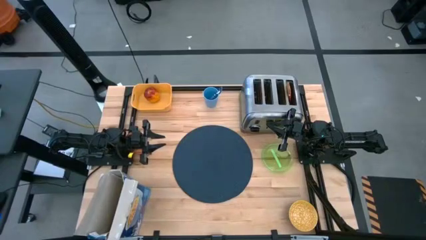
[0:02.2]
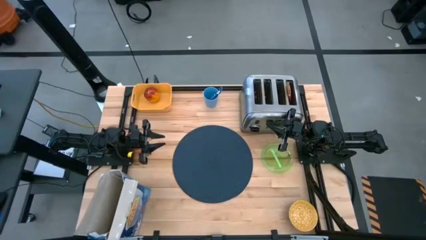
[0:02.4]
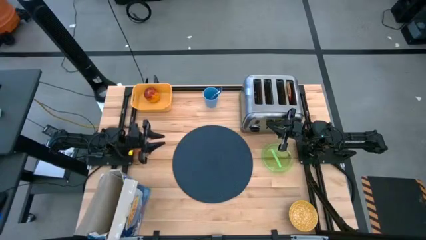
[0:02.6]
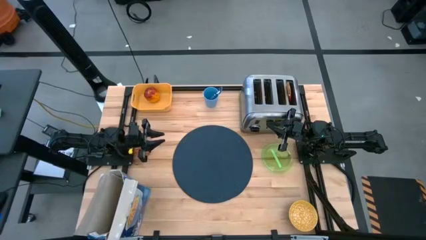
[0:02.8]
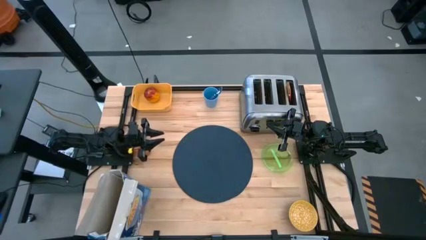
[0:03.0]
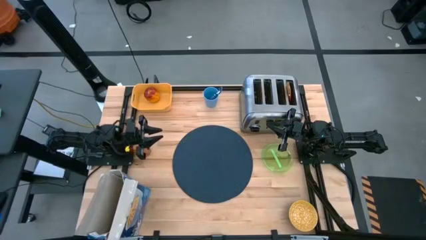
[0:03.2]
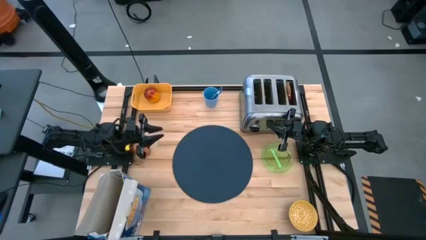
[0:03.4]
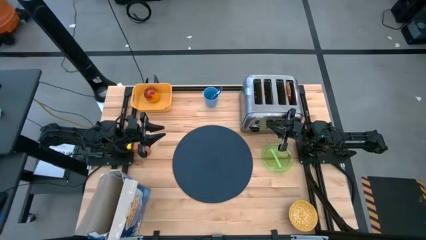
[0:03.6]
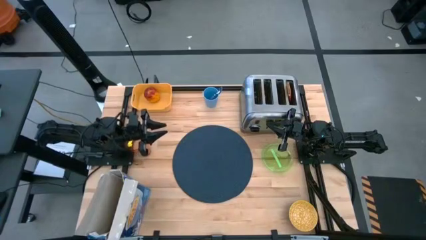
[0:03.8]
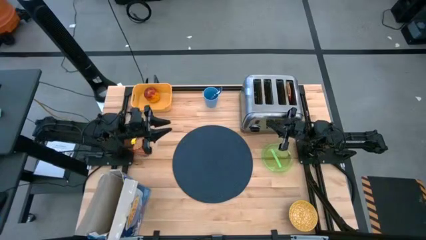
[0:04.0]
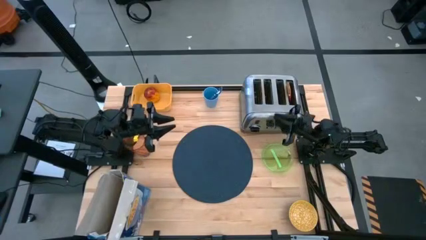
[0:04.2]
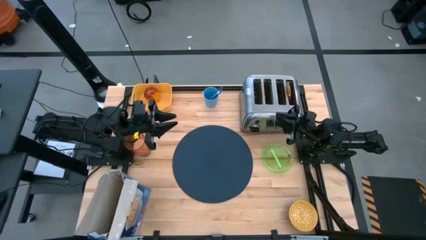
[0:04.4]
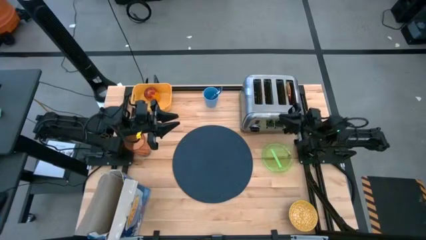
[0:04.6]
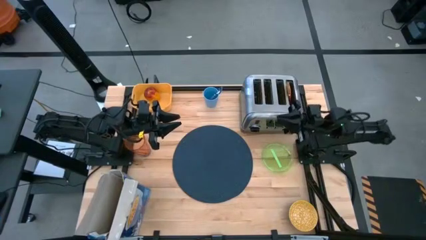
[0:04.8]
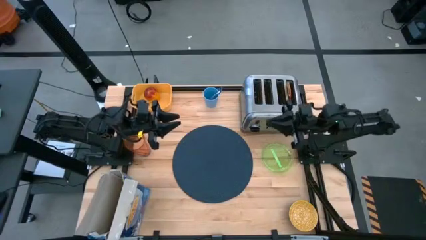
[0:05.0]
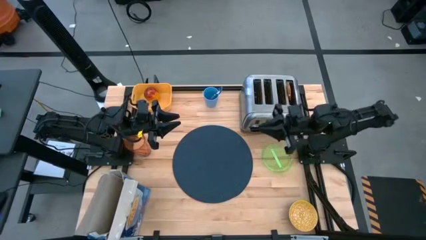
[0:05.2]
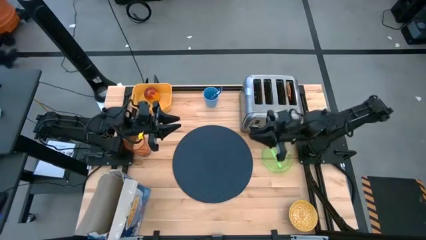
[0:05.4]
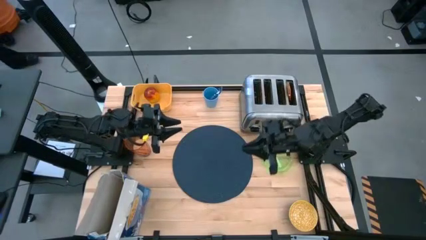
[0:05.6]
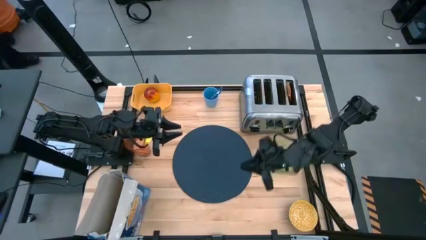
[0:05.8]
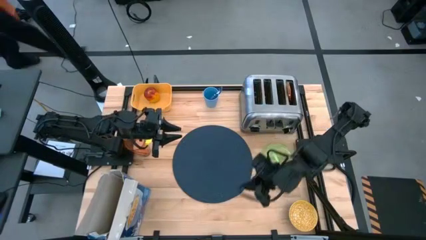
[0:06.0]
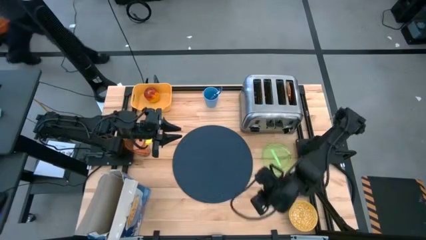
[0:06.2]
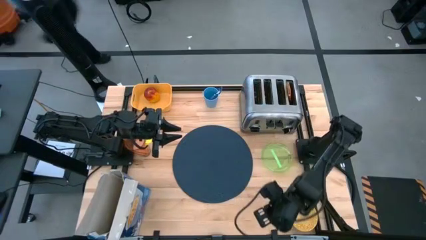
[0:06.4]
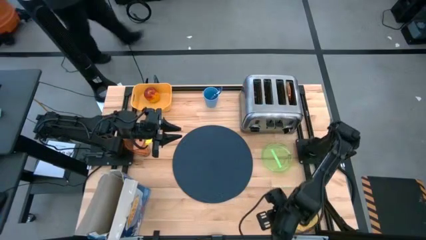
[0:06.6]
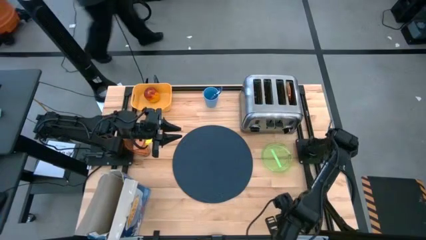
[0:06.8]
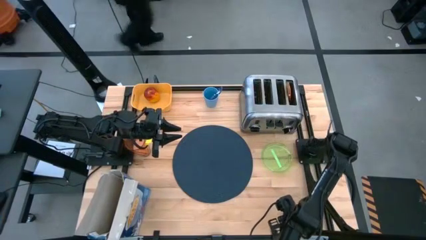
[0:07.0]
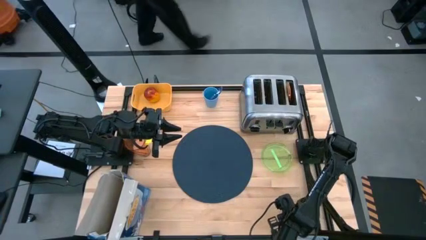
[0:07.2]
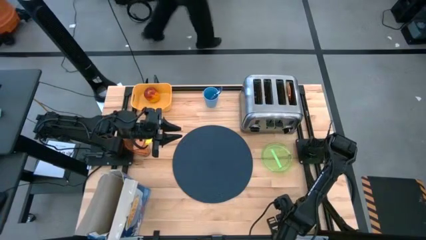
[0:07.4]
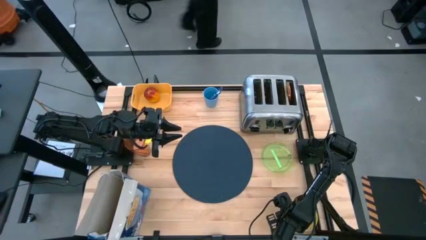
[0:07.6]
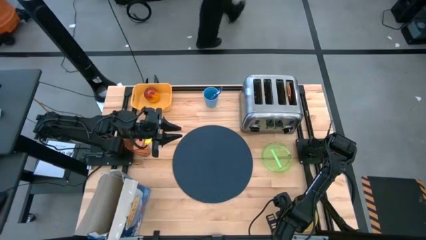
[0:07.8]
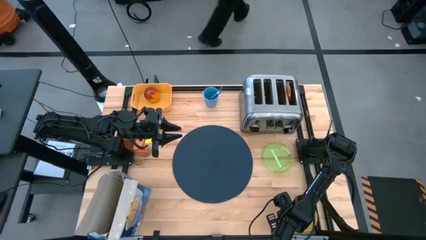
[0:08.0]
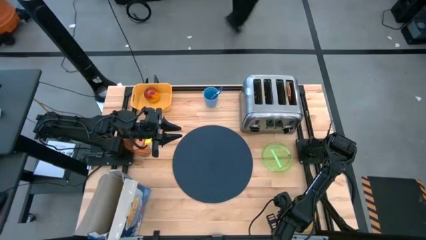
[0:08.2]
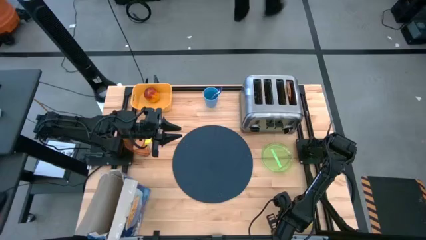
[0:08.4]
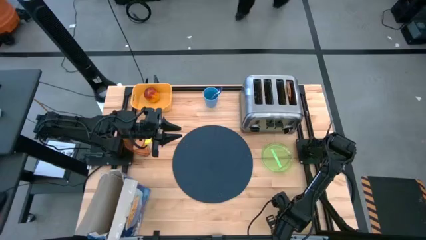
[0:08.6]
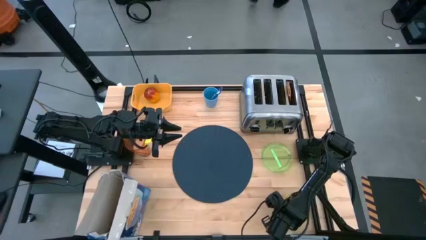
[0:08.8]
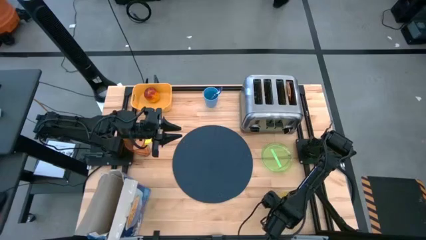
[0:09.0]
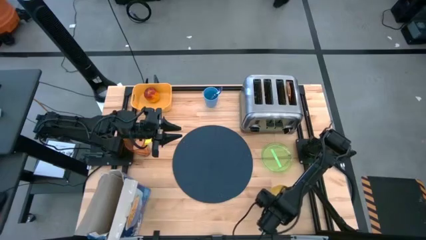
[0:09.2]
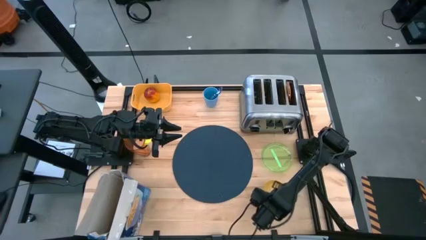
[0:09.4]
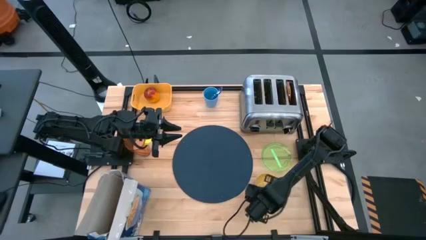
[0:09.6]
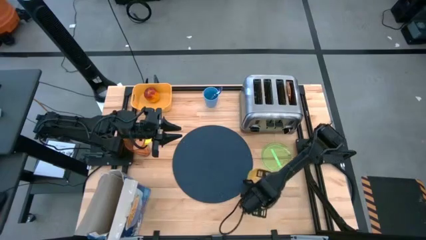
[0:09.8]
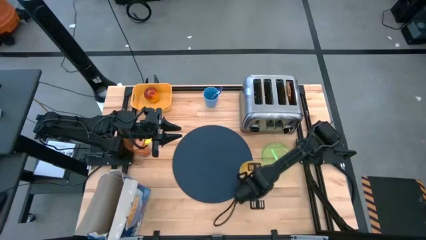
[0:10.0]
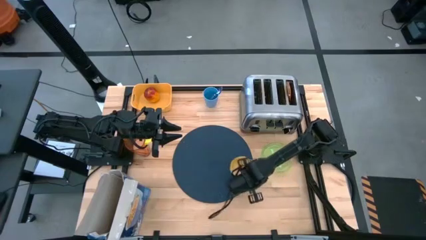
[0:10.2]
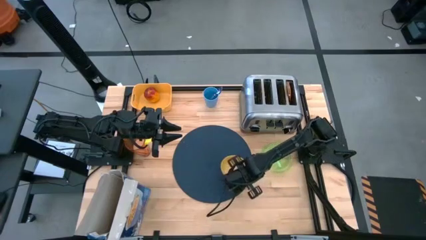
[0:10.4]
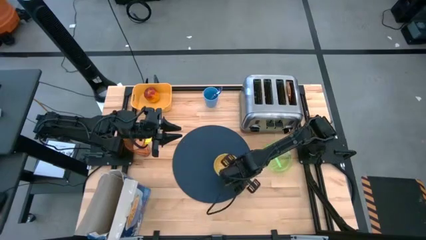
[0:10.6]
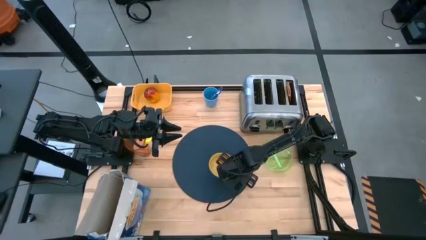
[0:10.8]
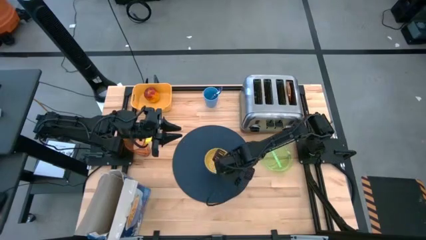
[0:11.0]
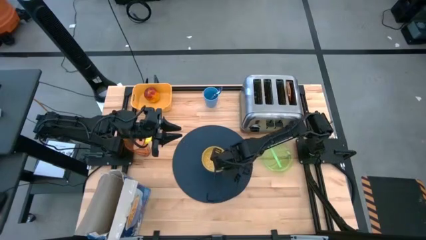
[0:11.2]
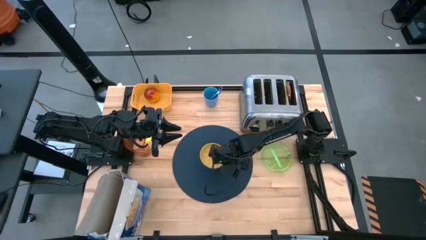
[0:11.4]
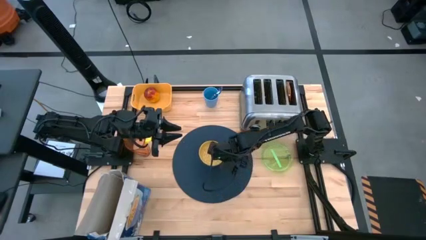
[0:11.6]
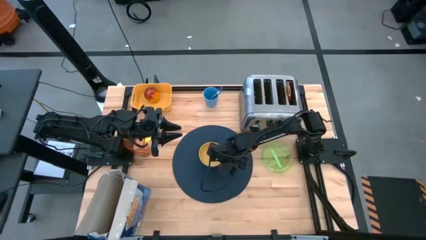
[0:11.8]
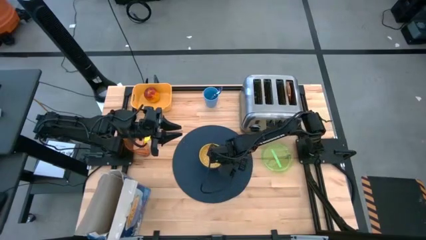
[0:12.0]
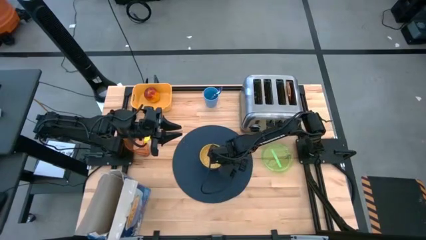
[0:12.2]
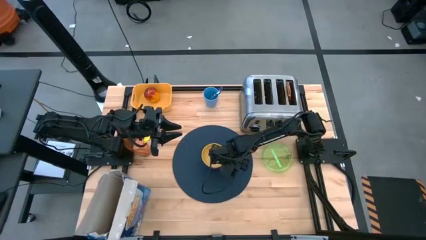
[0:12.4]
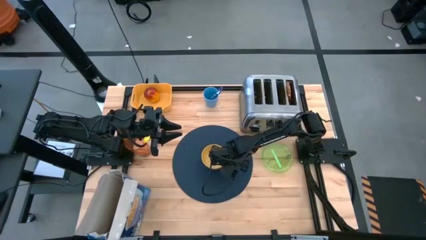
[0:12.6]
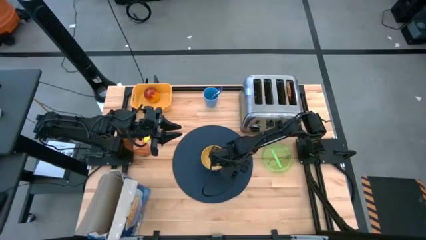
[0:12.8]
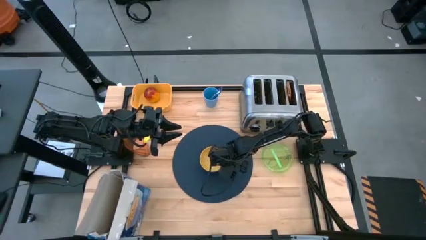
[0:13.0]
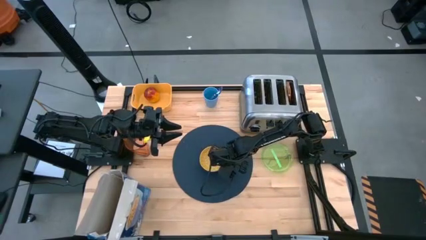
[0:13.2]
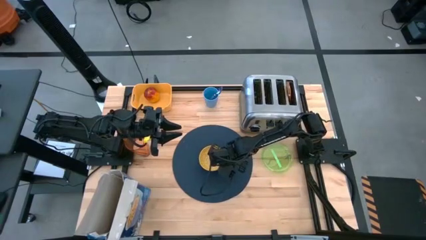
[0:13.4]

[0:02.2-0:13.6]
Task: Arrange a breakfast setting
Put the yellow bowl on the dark blue table mat
